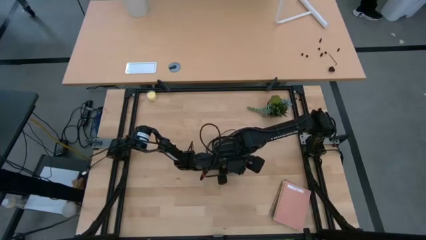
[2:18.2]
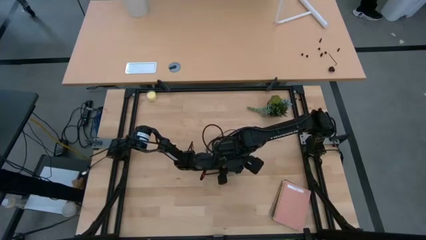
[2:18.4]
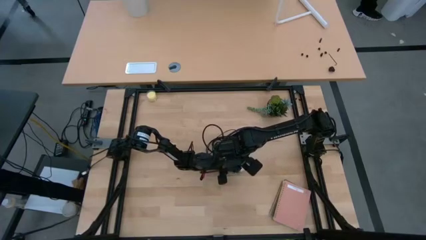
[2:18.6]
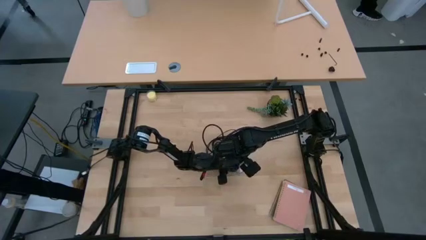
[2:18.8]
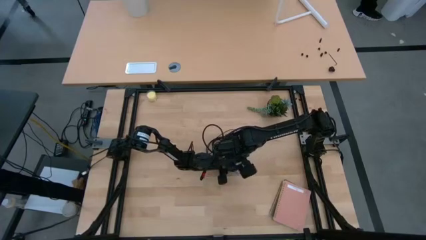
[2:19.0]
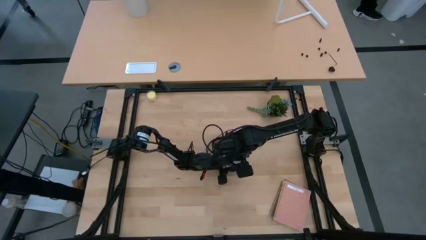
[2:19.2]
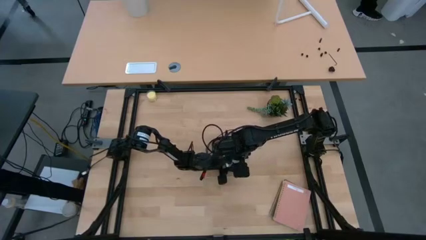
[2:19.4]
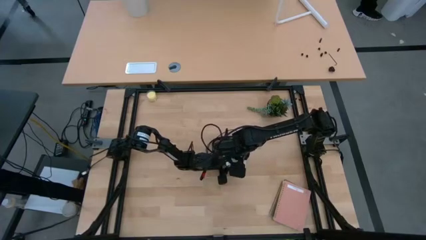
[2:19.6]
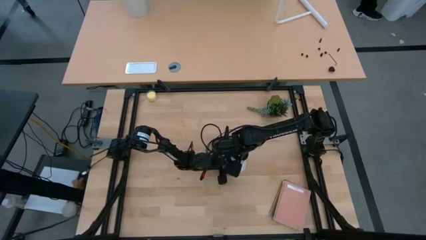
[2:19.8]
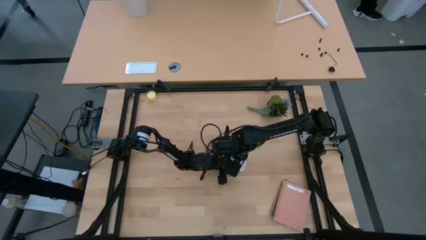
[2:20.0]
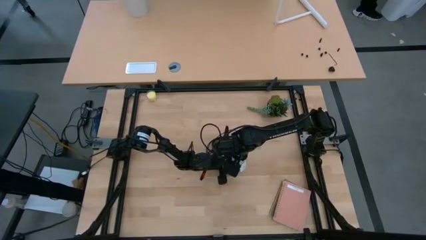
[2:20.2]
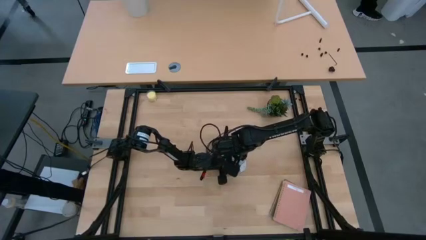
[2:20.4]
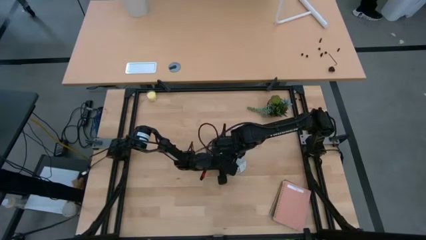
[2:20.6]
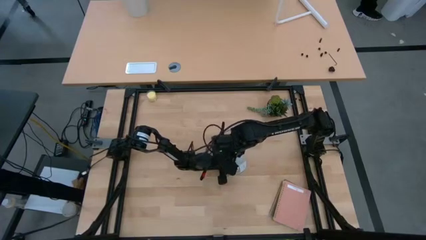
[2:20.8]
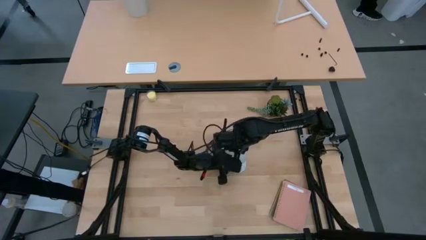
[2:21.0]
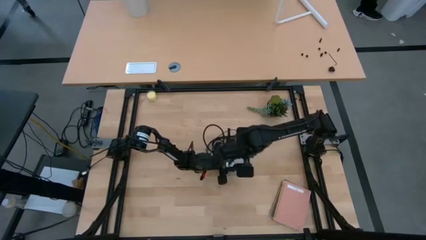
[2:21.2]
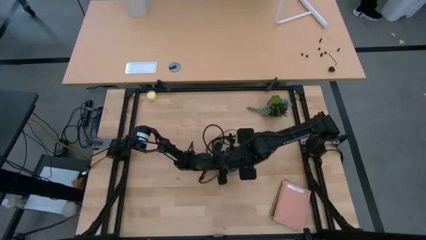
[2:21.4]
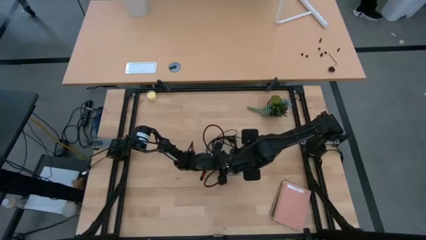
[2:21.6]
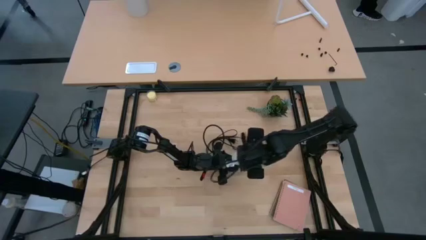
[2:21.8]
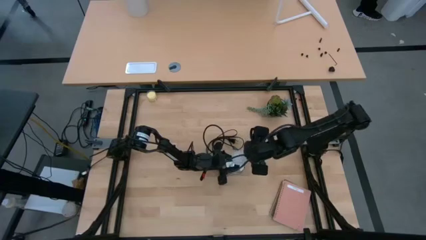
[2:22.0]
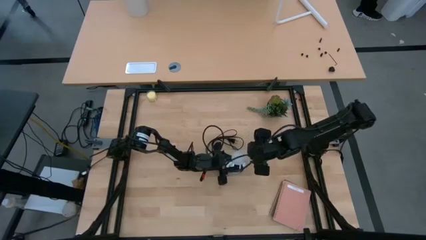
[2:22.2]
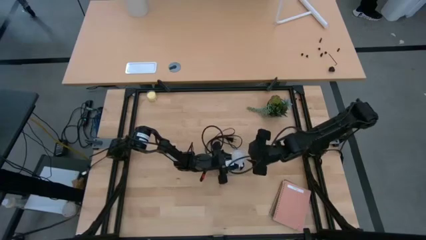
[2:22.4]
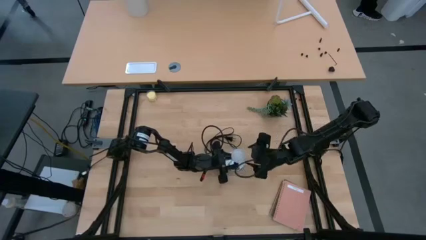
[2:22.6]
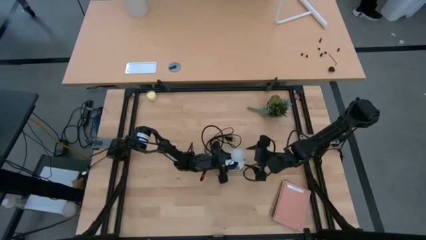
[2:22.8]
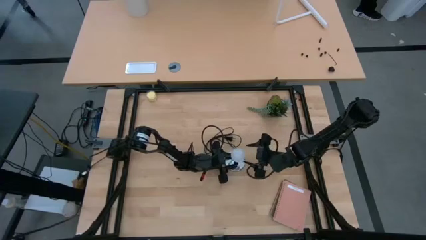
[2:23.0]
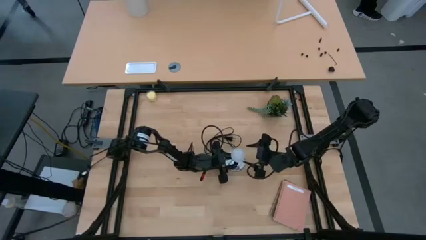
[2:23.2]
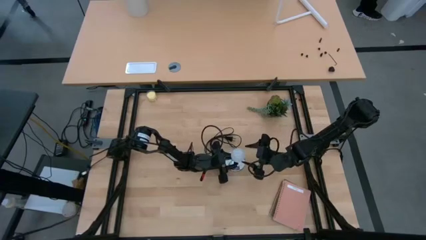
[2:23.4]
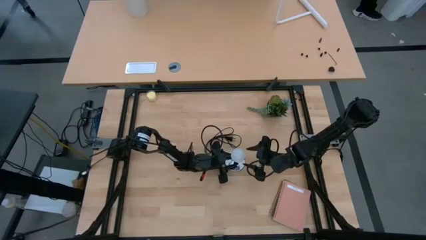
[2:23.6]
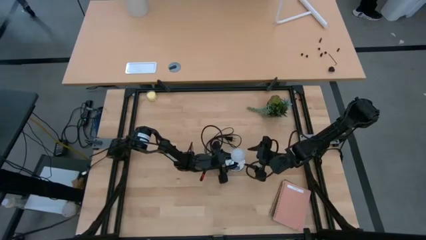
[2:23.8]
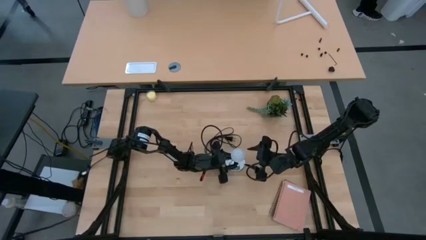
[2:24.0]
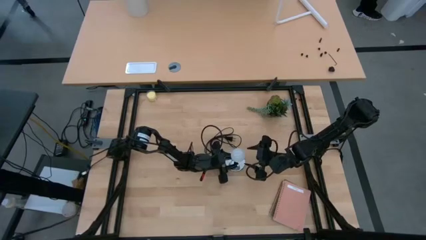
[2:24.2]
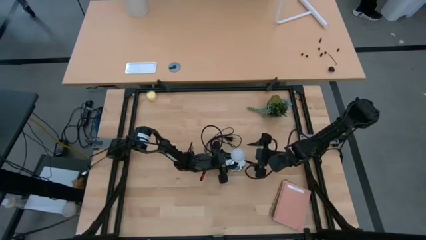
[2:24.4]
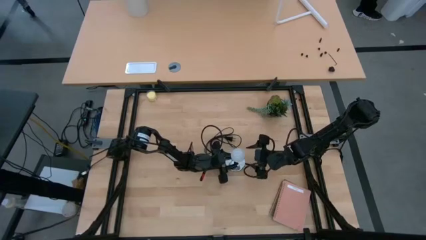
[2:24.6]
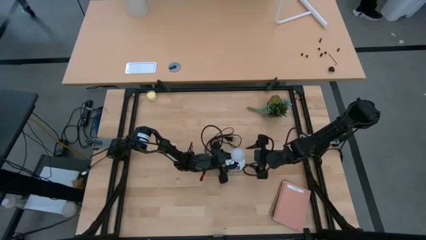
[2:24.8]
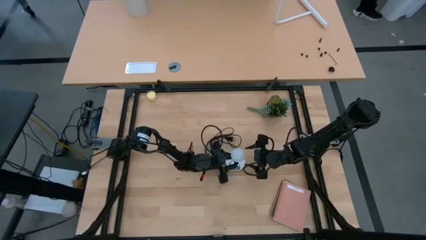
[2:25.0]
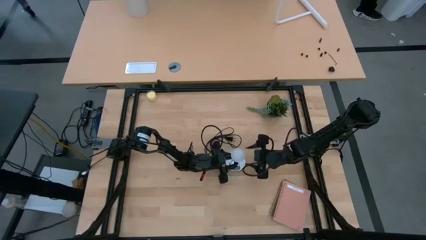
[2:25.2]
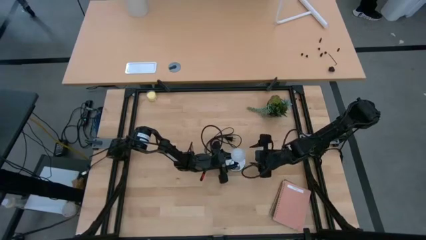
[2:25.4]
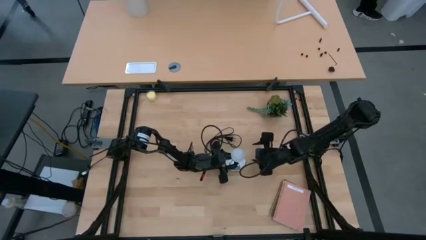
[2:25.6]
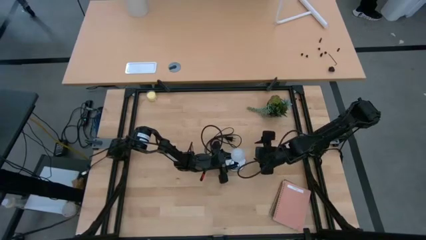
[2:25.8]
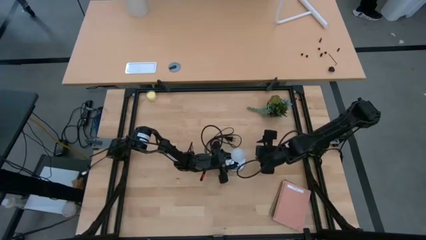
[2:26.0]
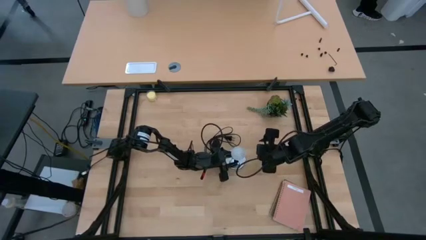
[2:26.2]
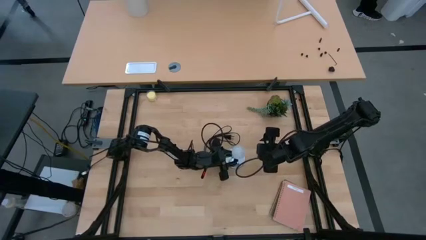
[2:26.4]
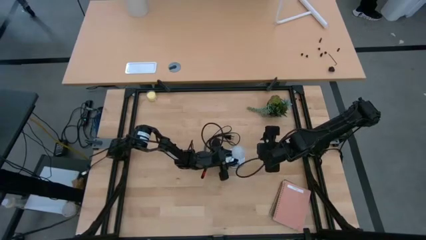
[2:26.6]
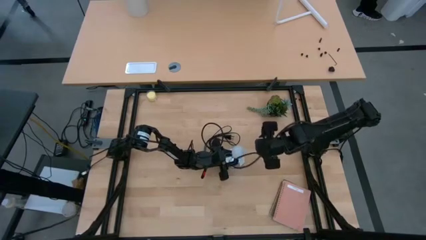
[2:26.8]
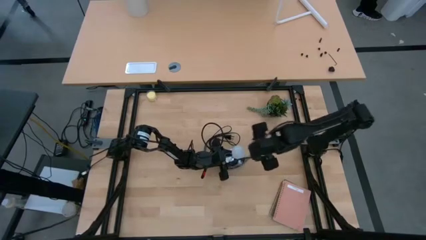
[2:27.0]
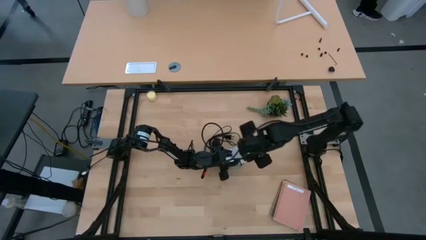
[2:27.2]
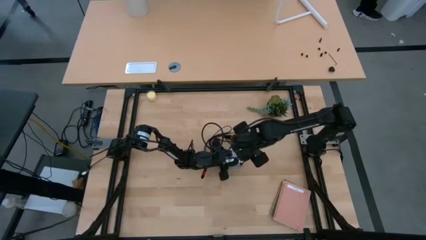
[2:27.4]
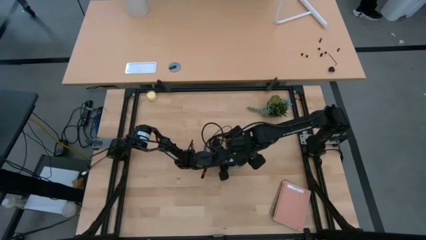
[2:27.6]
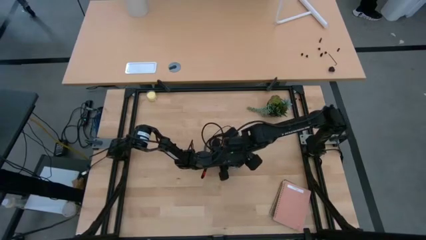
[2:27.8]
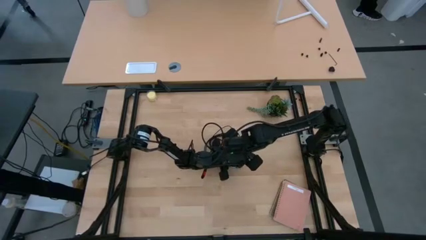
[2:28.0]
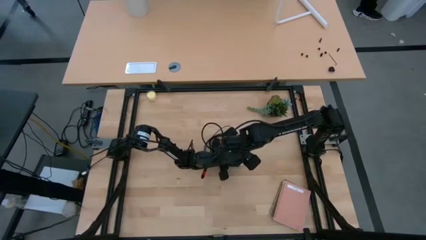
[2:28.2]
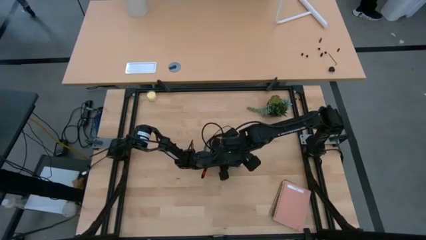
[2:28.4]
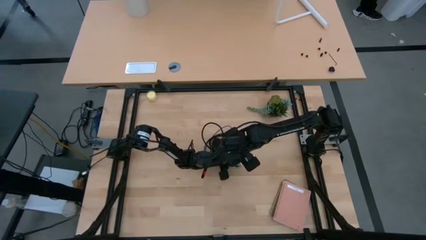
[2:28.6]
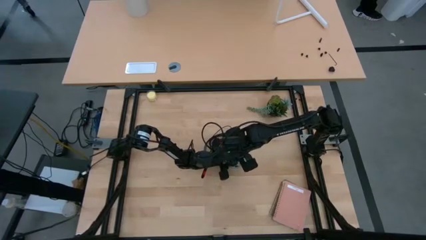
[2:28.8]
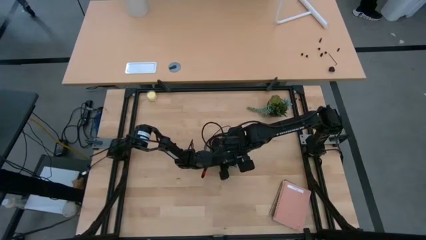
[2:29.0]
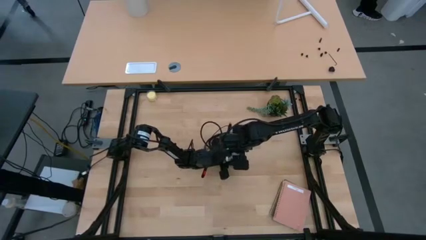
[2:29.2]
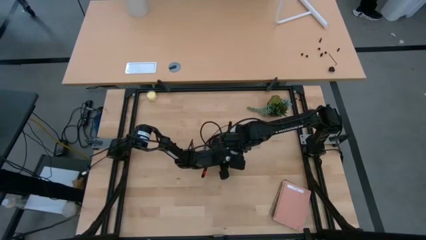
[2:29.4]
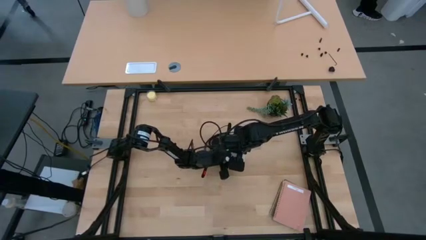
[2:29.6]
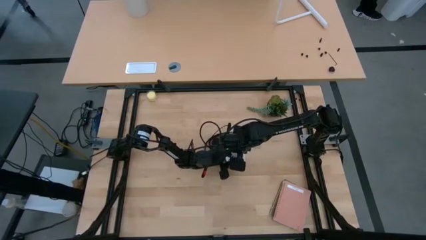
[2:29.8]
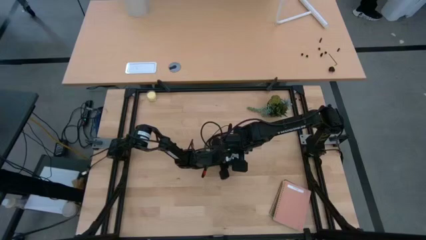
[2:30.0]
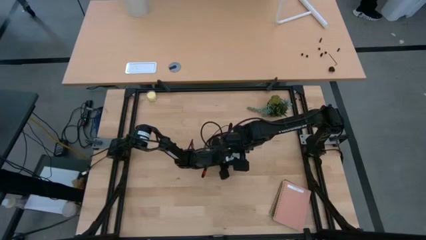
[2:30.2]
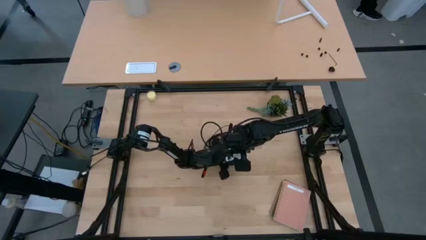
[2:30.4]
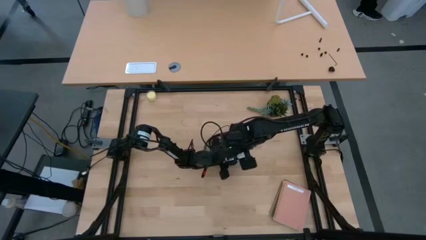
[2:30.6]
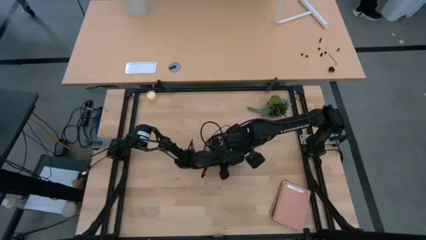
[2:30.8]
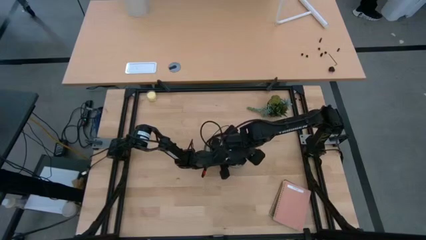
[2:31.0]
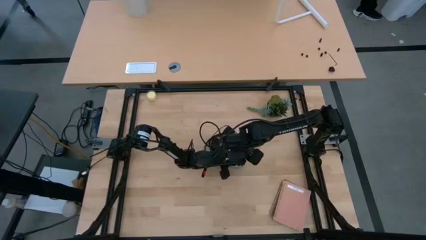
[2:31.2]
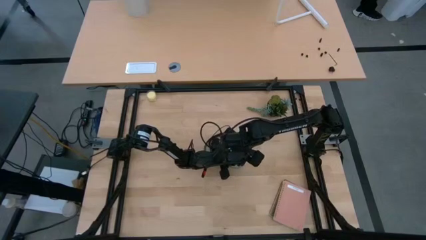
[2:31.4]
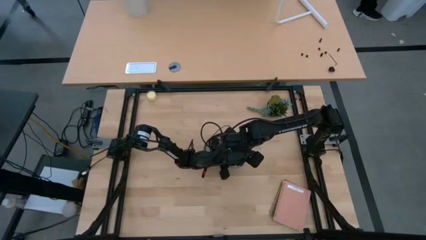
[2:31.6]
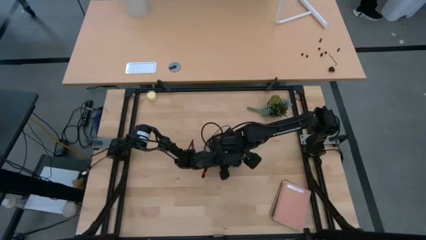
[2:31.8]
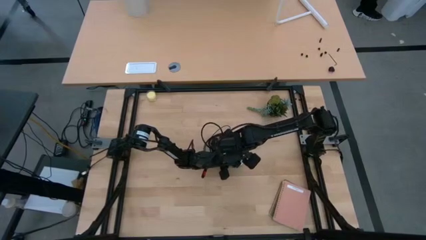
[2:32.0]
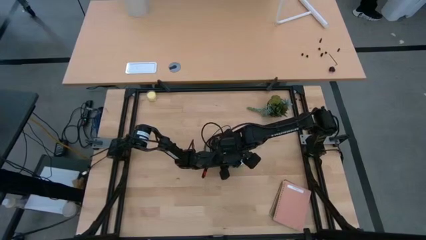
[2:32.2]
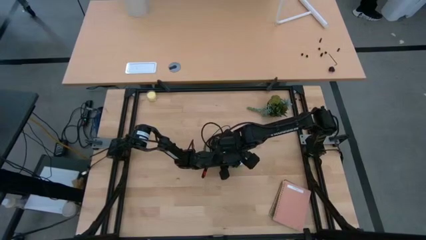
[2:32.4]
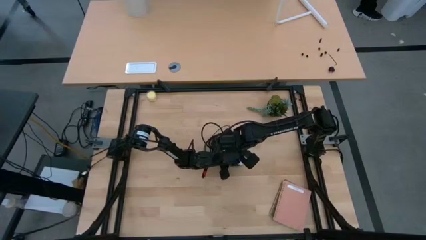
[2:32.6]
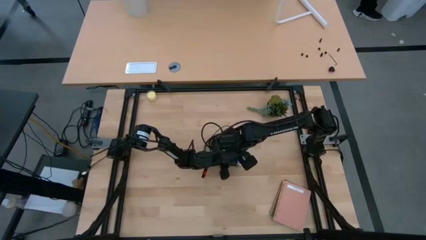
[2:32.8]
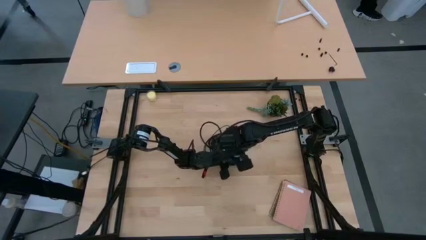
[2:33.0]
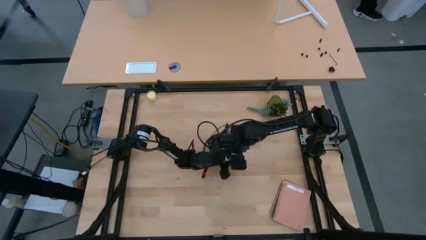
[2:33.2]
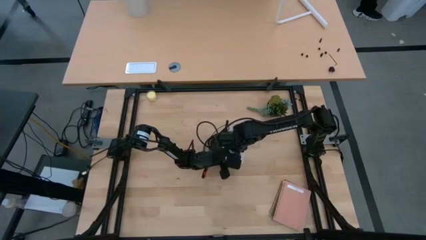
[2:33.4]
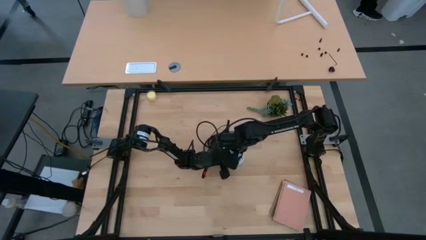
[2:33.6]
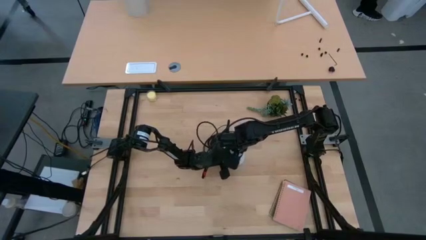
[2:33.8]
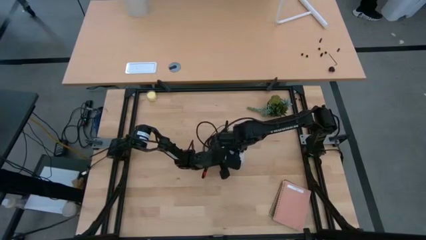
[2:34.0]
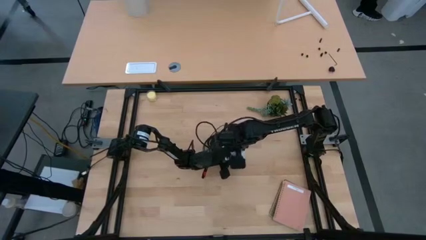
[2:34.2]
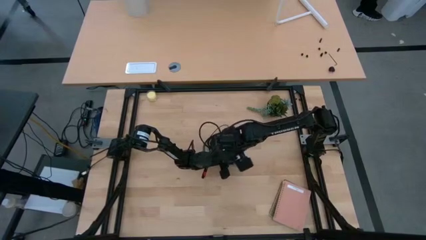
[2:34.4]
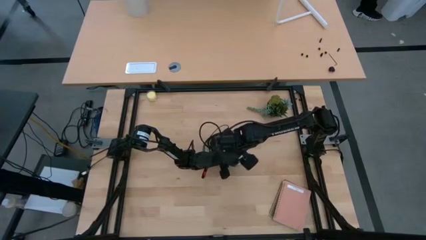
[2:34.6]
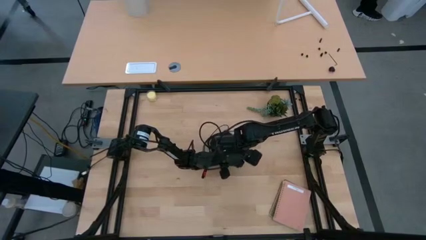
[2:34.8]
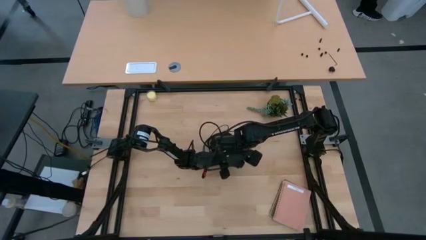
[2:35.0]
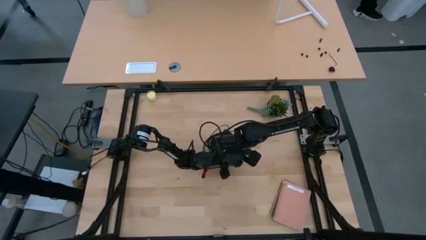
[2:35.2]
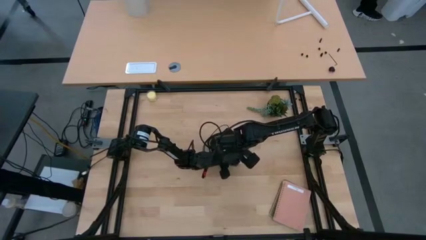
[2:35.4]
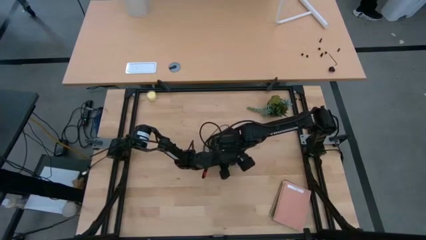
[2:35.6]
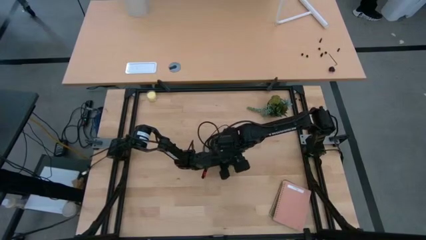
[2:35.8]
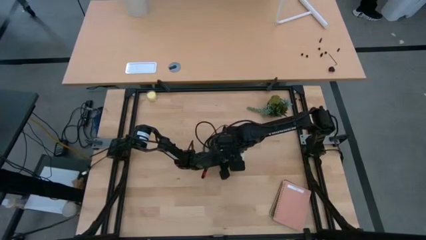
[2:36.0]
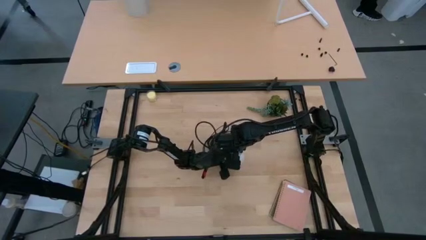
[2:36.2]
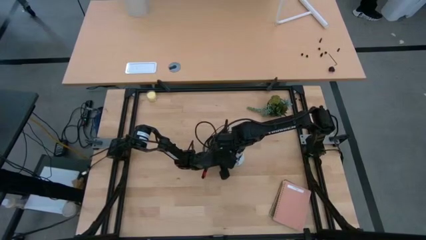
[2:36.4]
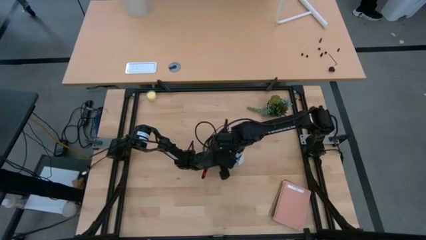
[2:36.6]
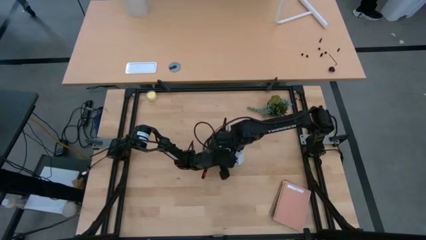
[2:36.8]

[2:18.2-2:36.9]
Task: Screw lightbulb
Insert the white lightbulb into the metallic lamp
